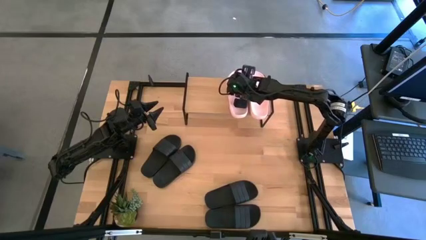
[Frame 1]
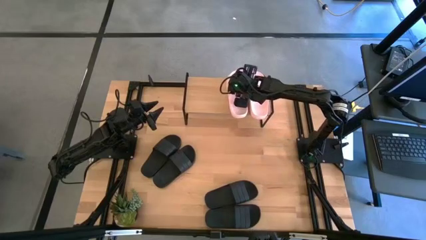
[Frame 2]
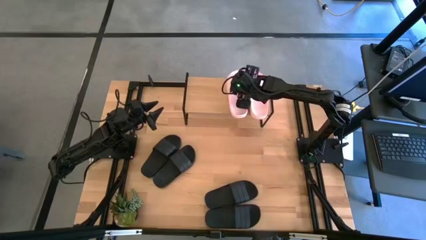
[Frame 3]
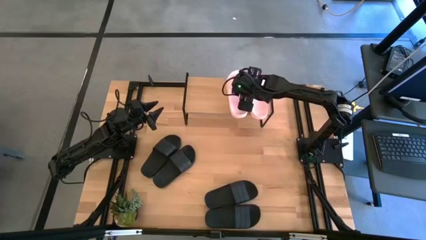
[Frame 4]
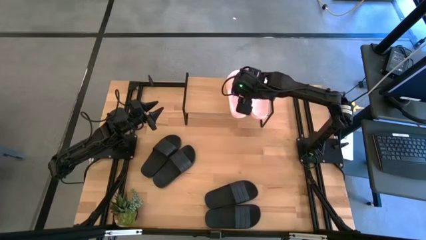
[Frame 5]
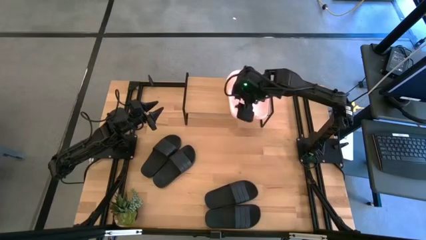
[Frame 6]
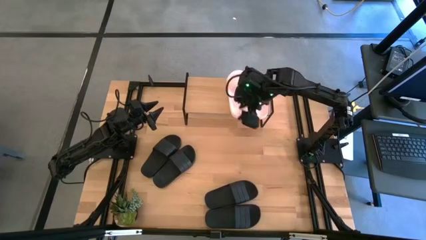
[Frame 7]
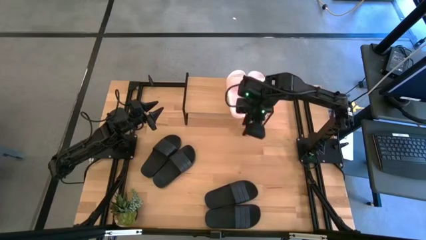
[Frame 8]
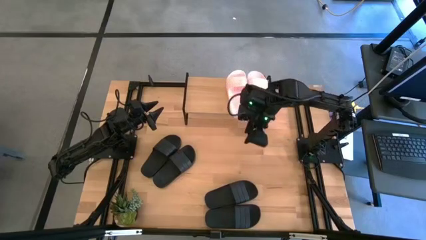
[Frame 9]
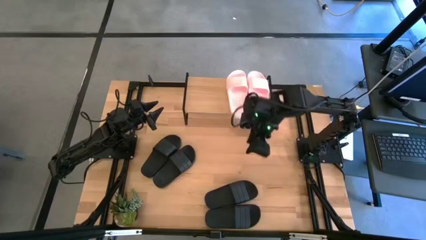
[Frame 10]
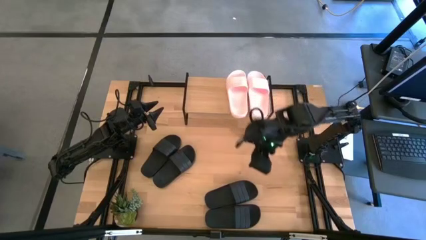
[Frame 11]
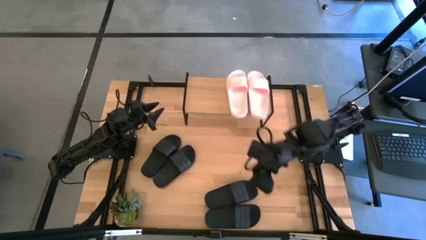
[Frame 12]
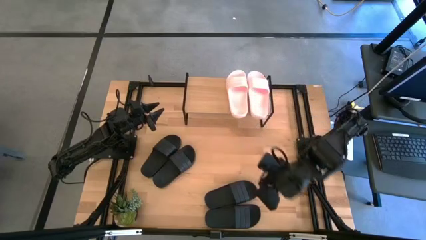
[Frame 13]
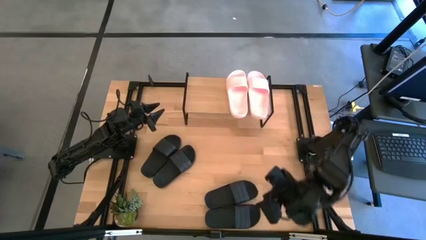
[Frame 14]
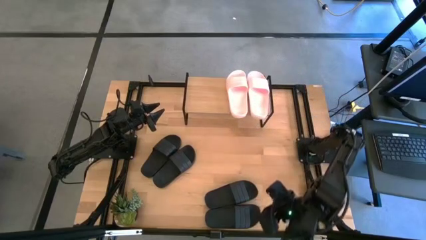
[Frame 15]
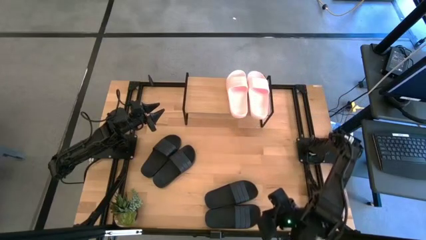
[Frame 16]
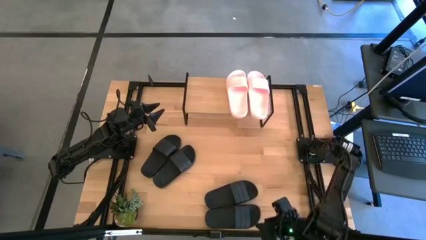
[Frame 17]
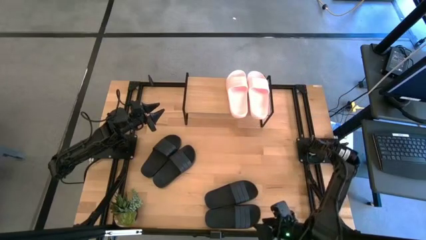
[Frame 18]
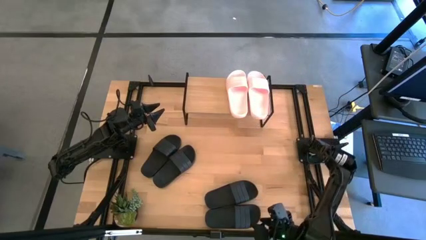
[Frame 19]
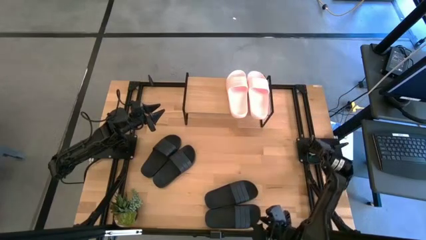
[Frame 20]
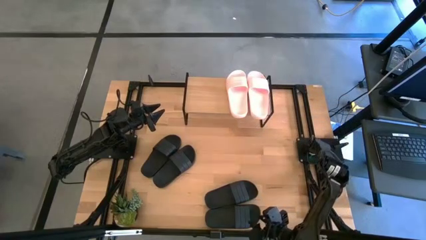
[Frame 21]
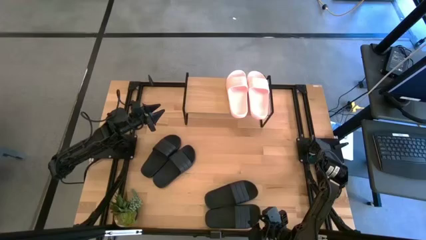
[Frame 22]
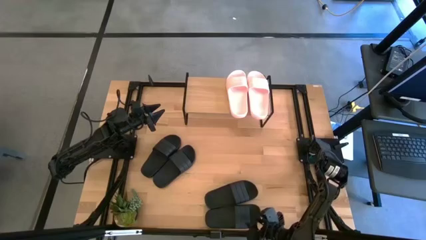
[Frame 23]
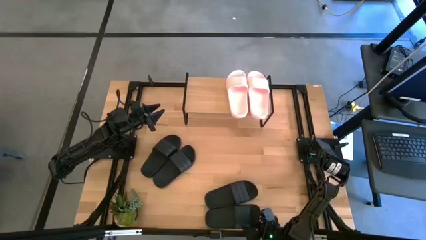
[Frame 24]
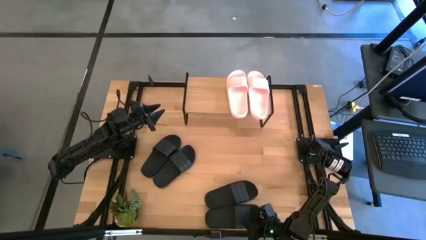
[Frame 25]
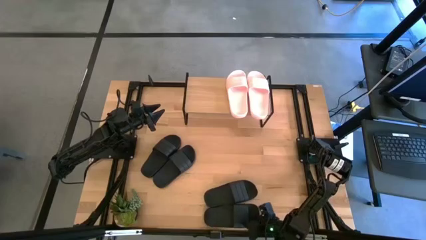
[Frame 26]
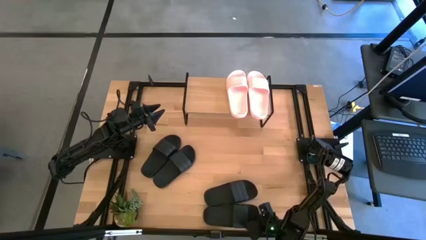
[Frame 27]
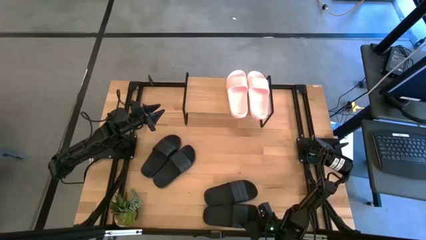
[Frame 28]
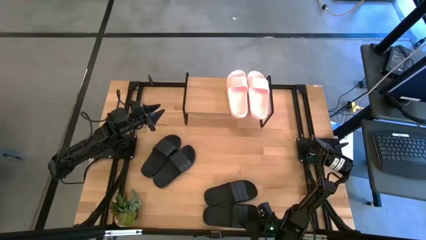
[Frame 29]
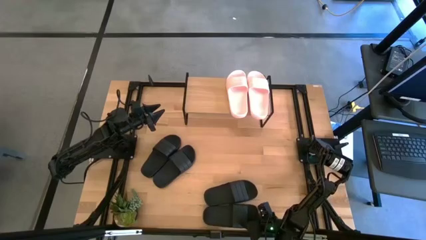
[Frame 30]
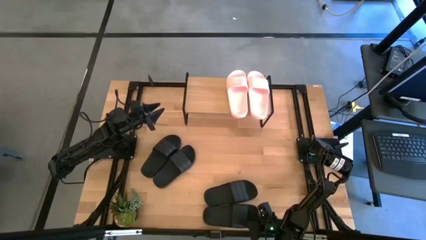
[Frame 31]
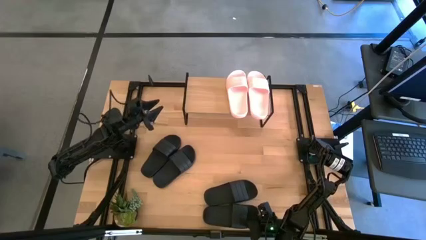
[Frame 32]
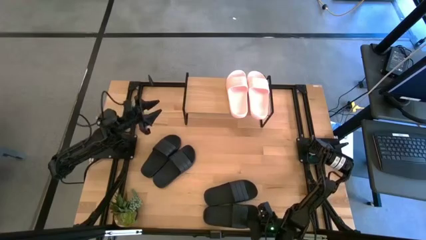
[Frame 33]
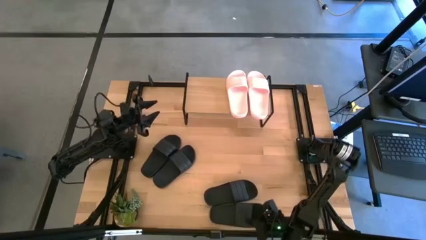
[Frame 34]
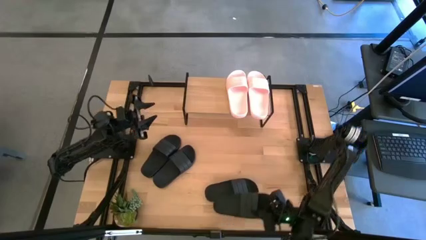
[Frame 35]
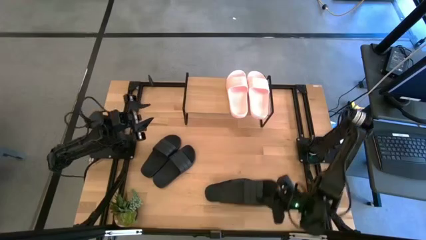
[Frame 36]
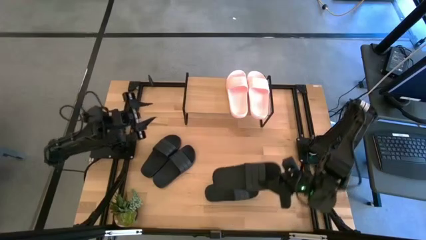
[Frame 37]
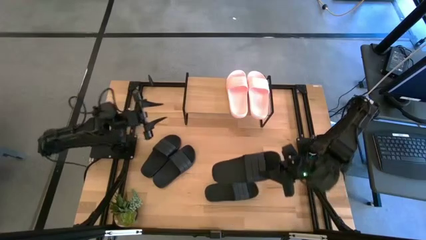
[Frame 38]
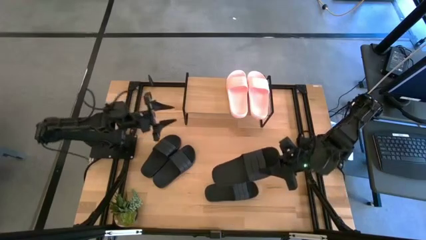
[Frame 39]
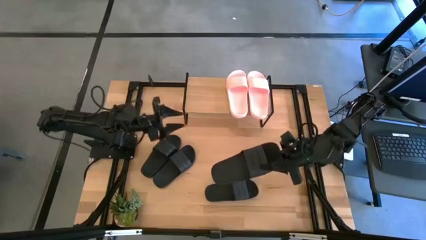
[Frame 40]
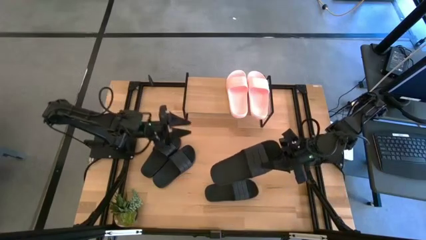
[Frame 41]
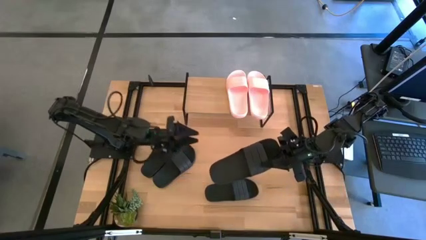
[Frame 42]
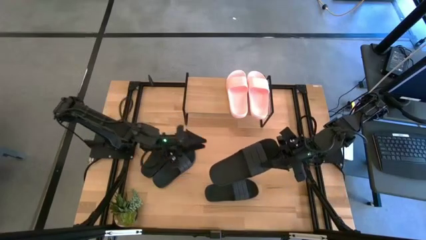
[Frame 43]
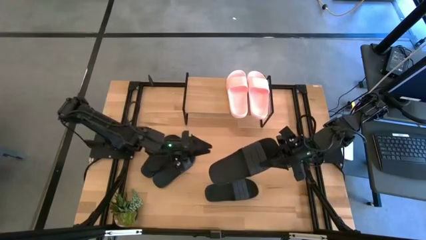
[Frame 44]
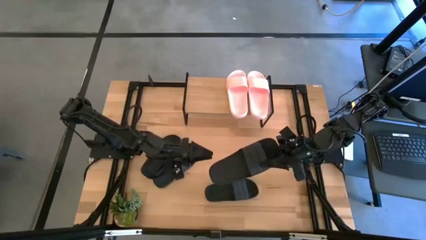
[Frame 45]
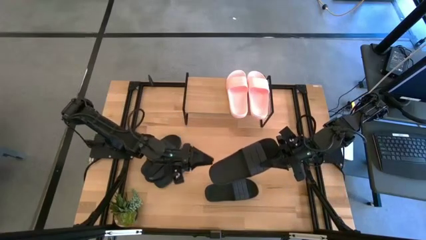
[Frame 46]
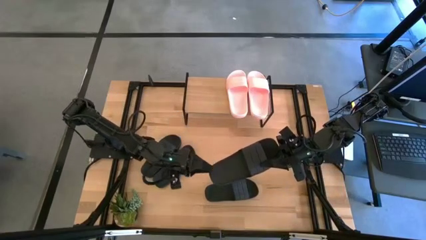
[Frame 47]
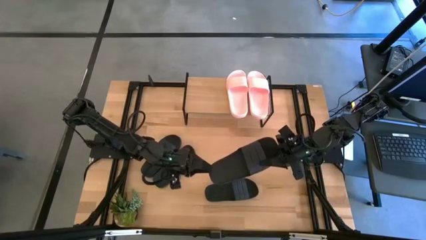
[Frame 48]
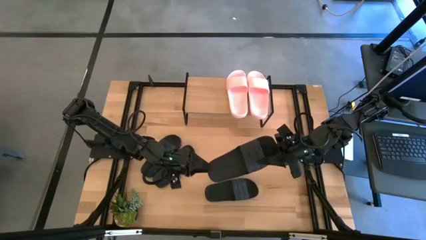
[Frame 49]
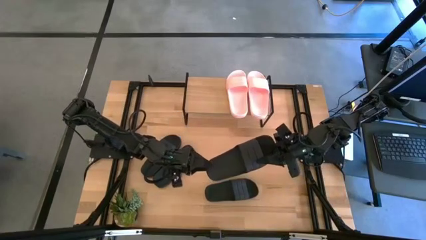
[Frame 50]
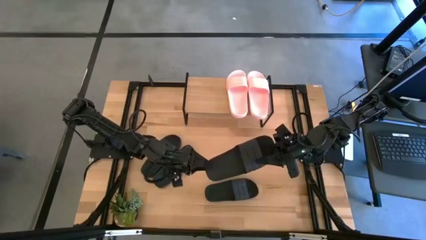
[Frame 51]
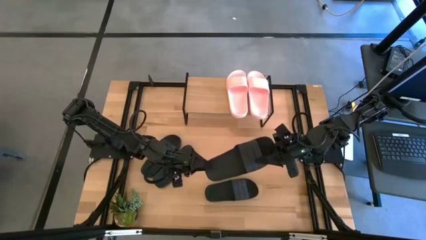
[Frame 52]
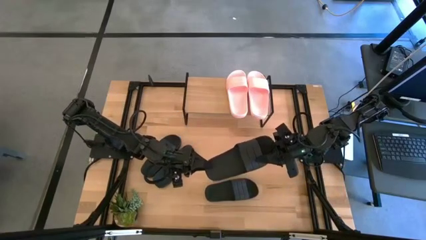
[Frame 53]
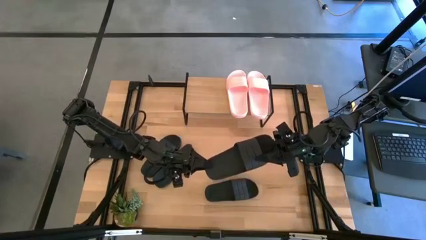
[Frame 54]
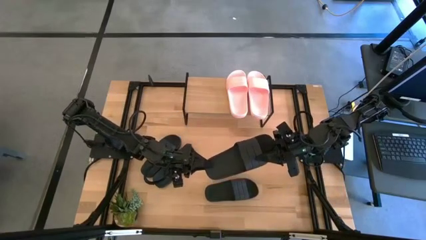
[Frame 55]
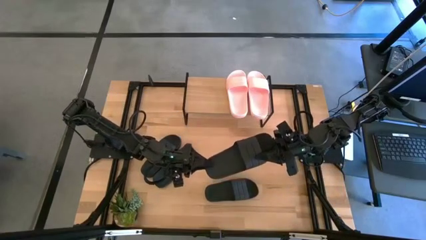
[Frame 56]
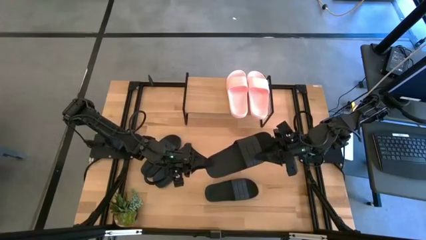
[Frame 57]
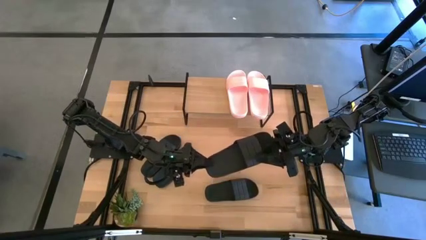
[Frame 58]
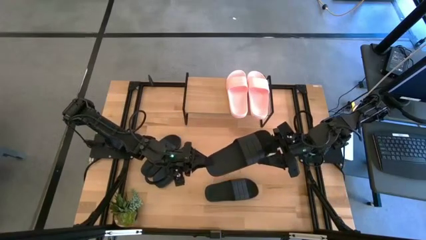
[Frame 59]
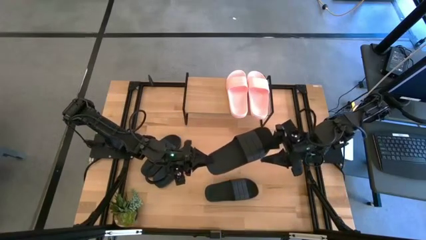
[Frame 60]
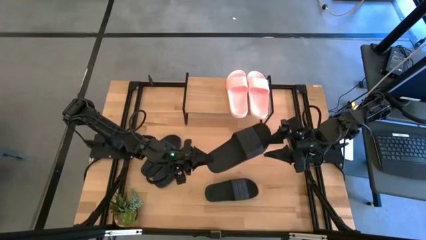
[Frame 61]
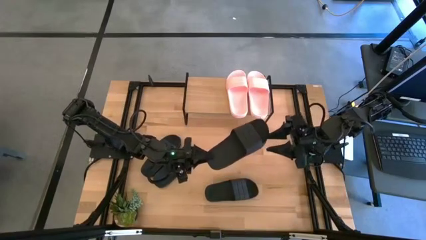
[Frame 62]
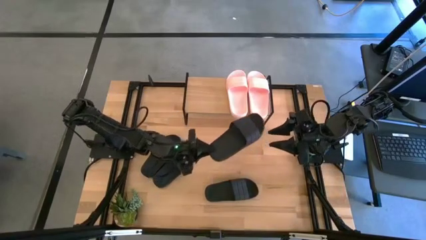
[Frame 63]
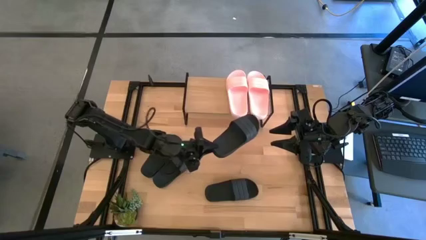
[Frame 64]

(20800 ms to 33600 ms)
Task: Pick and place slides into the shelf
Put the bottom black slide under the shelf
